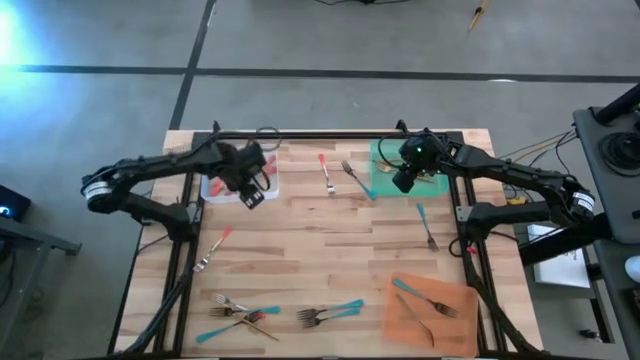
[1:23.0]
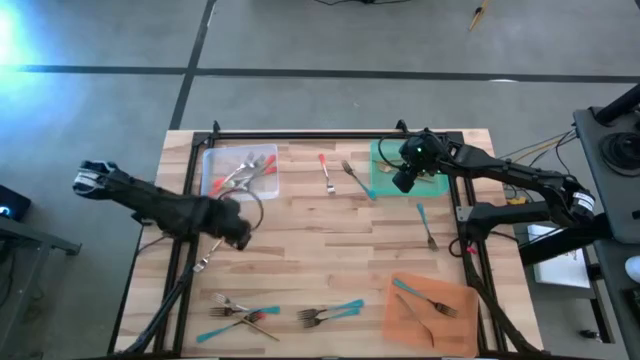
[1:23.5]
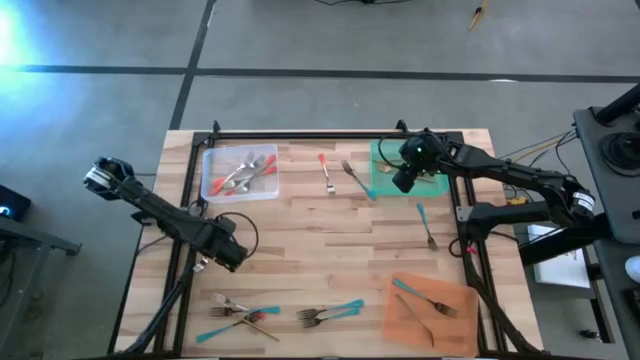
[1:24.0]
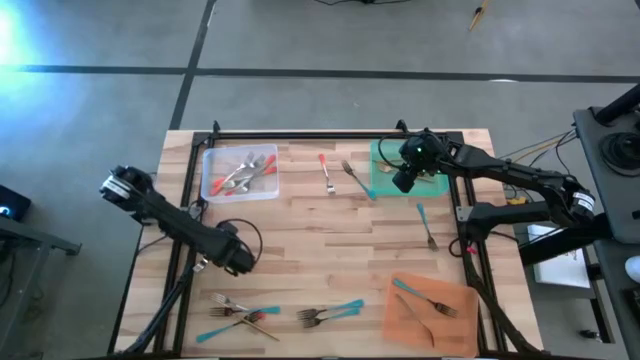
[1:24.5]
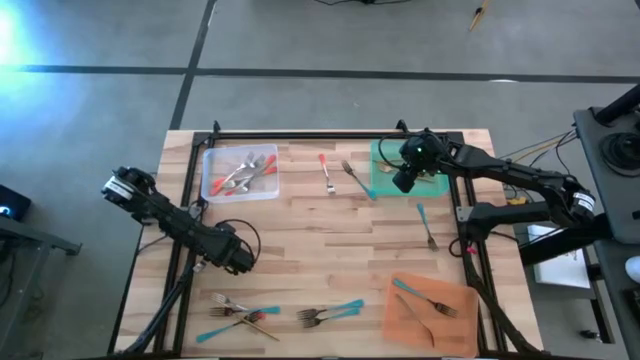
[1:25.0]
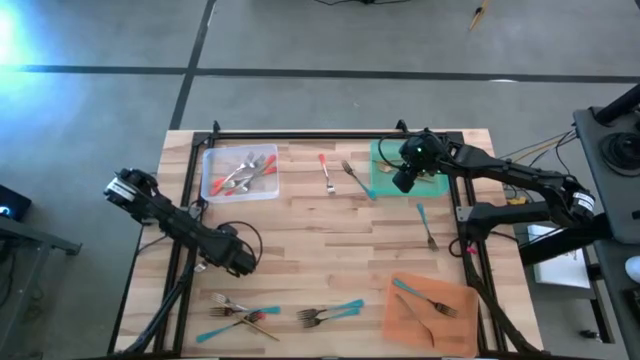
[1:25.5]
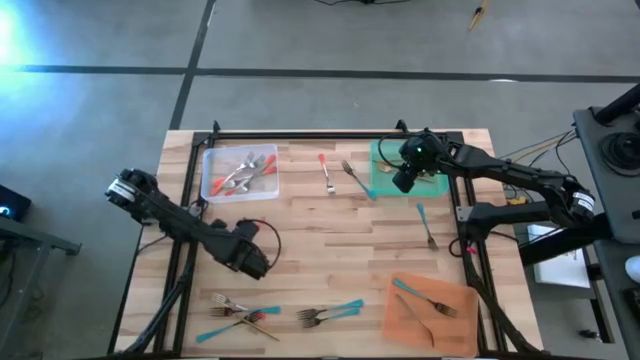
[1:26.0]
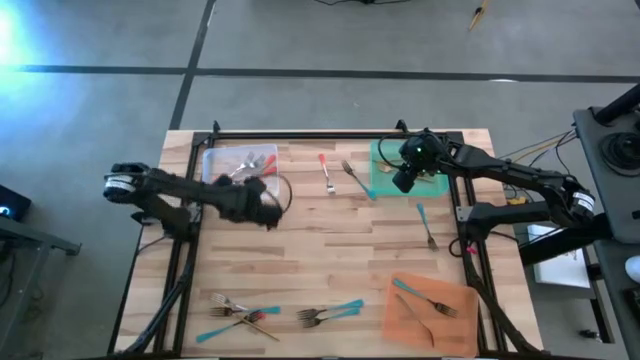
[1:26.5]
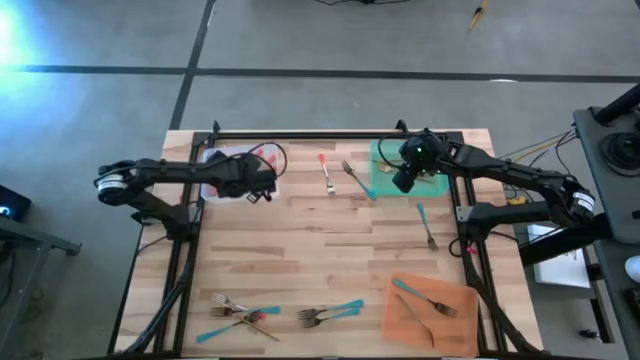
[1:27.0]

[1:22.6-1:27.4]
Task: Sort silverware by color (type)
Put the orange fork into the white bin

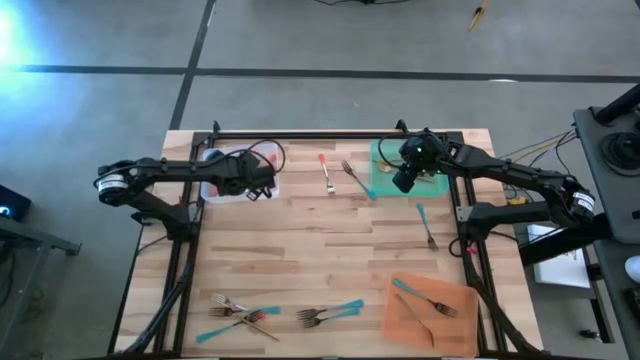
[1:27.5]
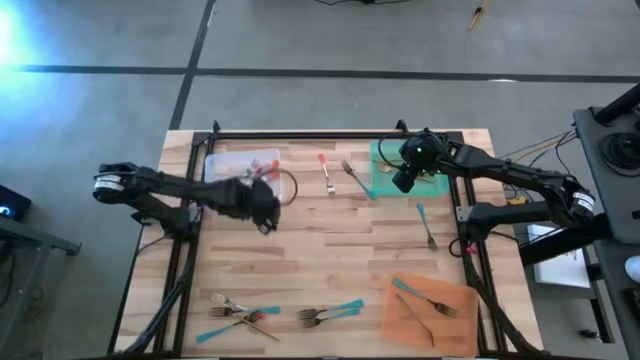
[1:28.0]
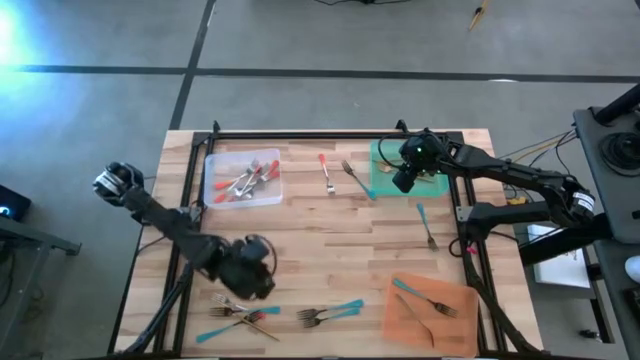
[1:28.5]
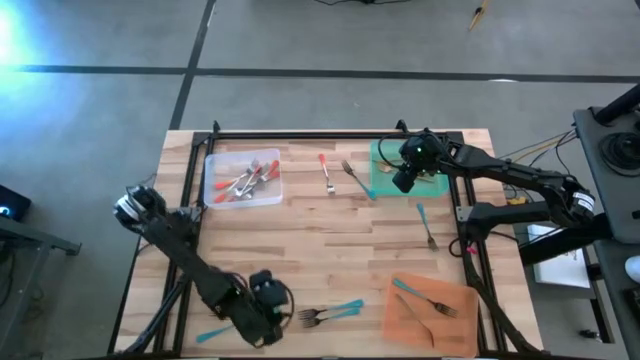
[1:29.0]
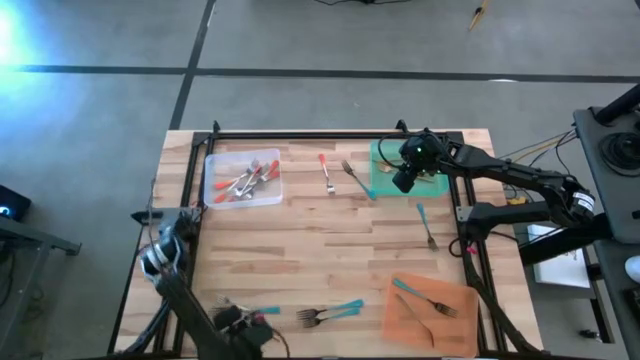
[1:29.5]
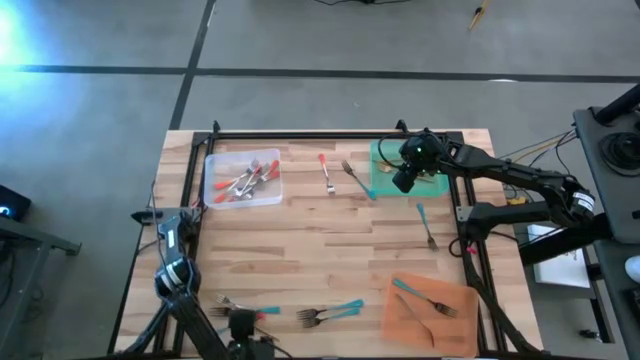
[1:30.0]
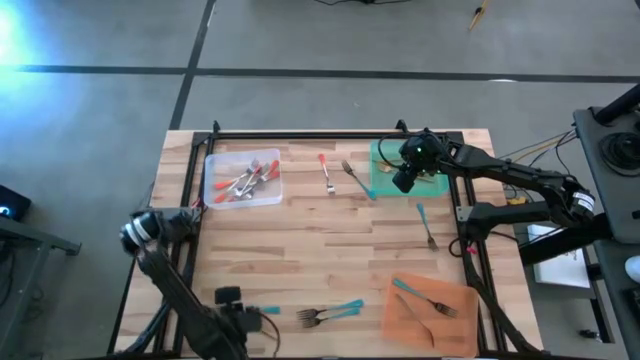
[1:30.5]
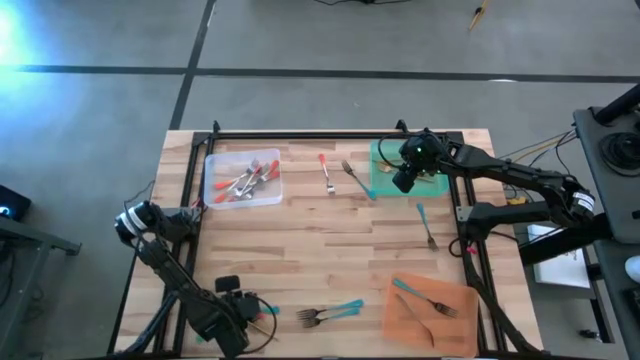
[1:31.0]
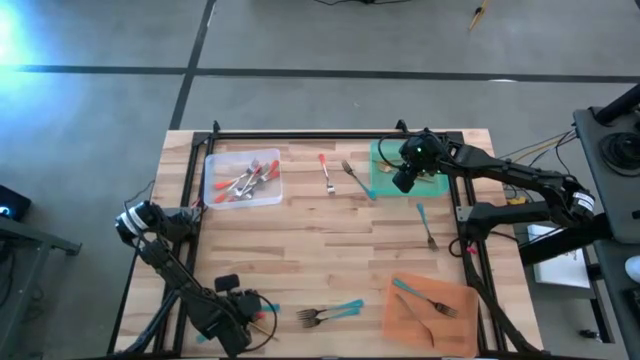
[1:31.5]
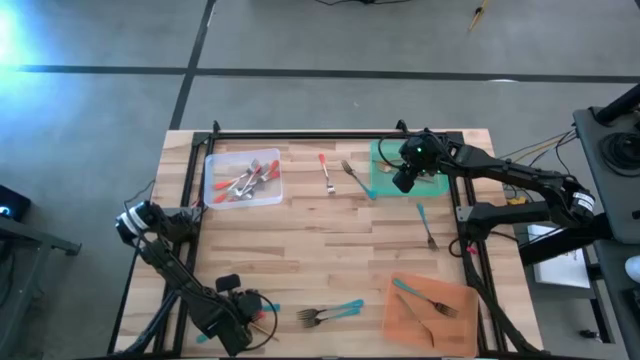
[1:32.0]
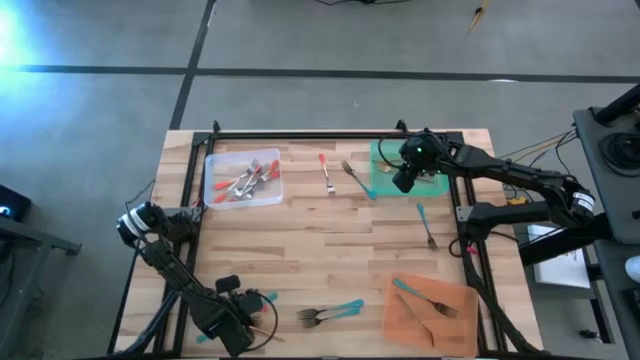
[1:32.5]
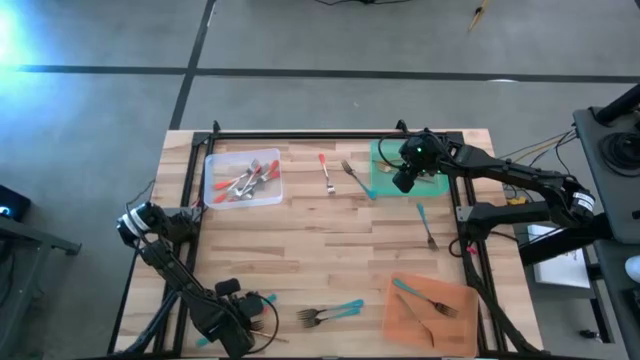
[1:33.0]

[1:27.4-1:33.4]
Put the blue fork into the orange bin

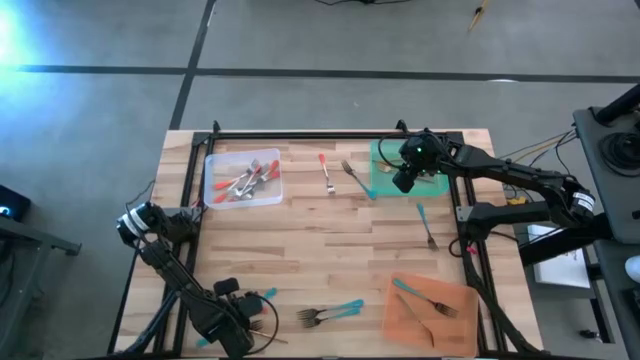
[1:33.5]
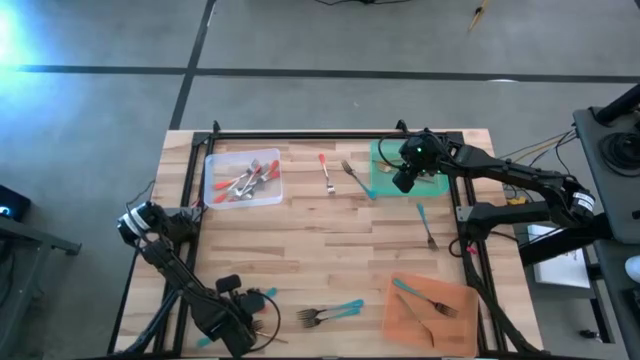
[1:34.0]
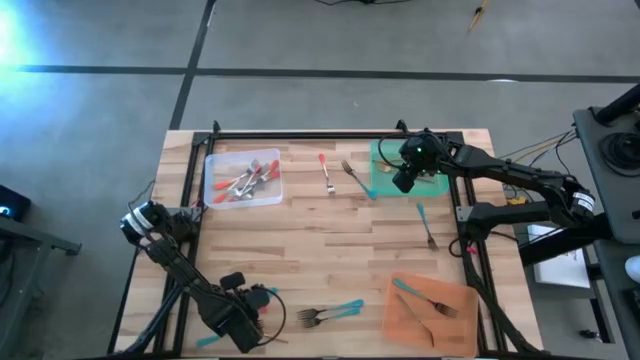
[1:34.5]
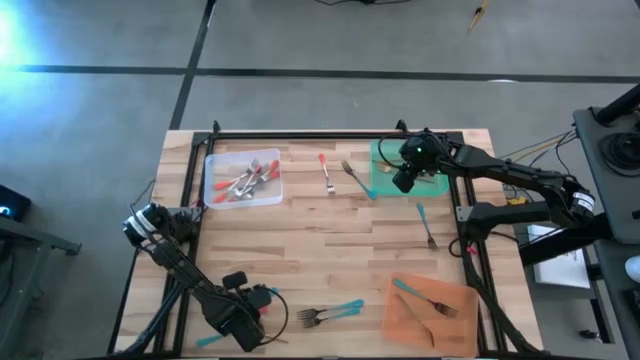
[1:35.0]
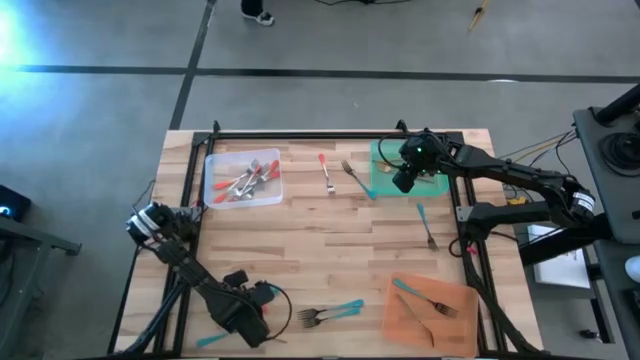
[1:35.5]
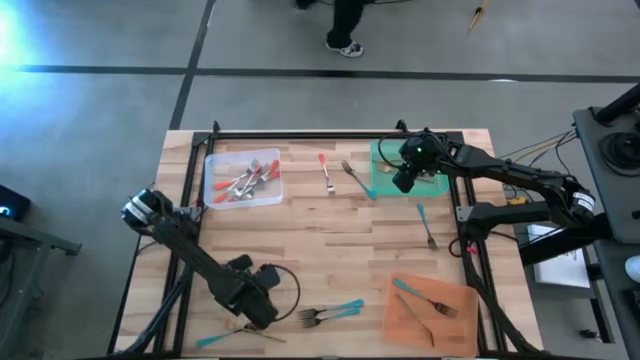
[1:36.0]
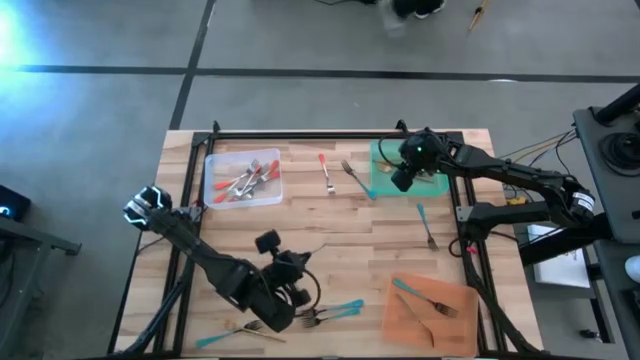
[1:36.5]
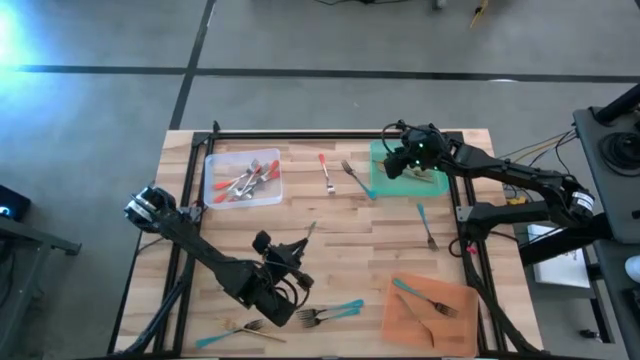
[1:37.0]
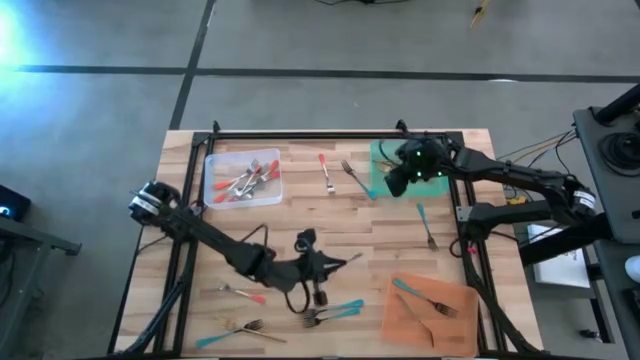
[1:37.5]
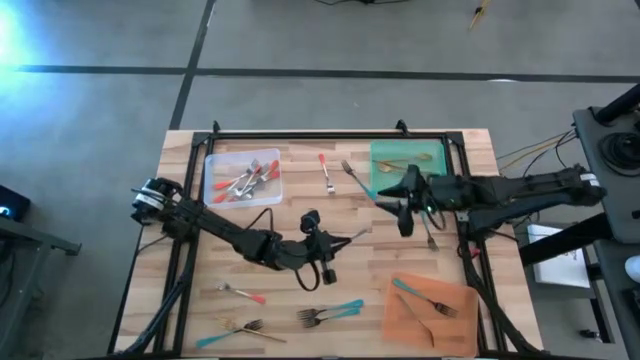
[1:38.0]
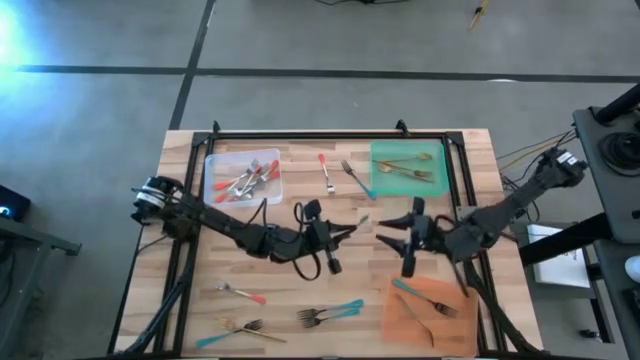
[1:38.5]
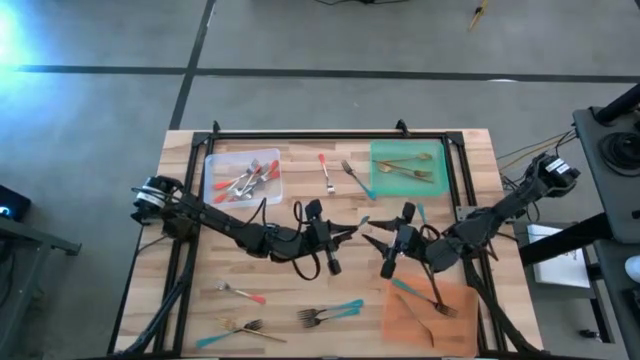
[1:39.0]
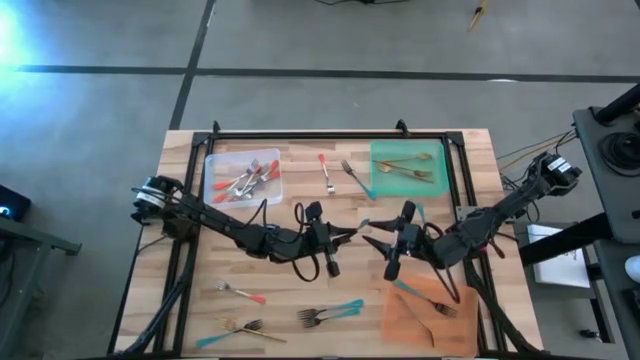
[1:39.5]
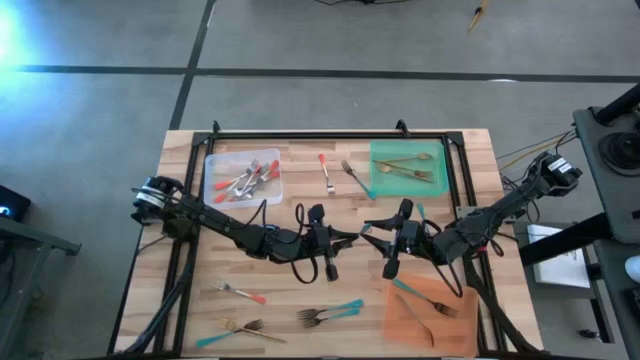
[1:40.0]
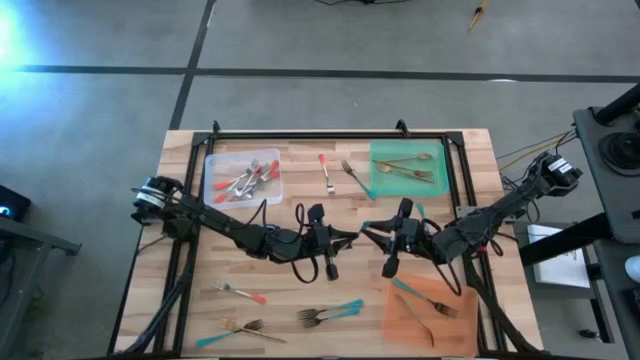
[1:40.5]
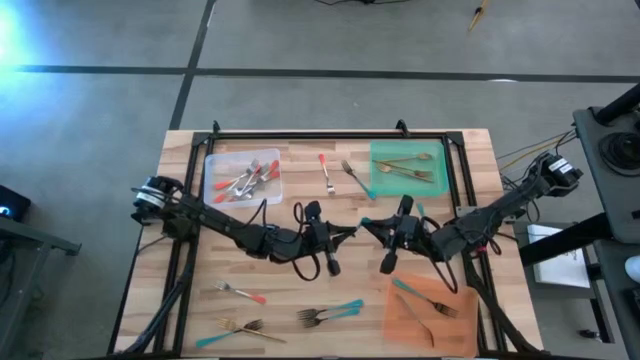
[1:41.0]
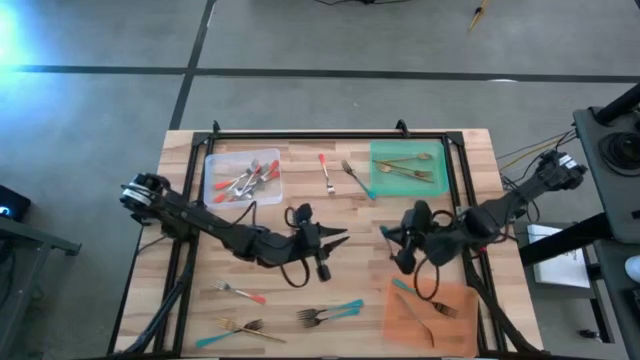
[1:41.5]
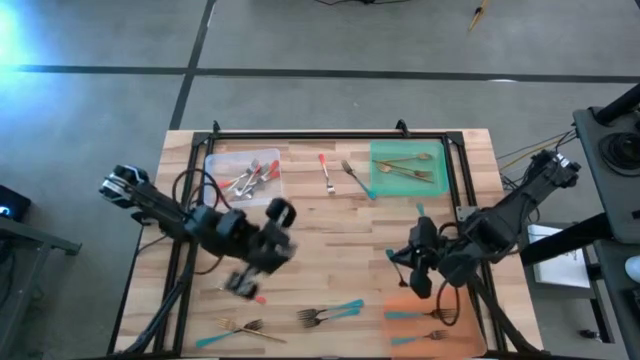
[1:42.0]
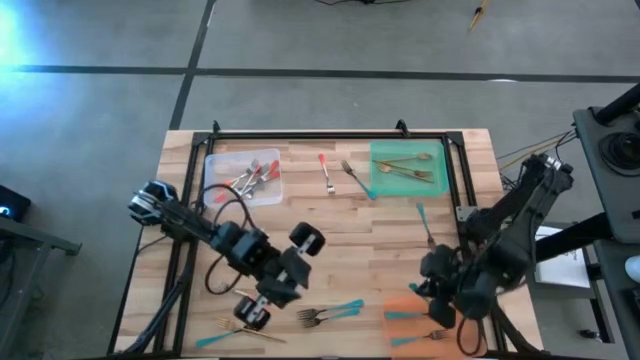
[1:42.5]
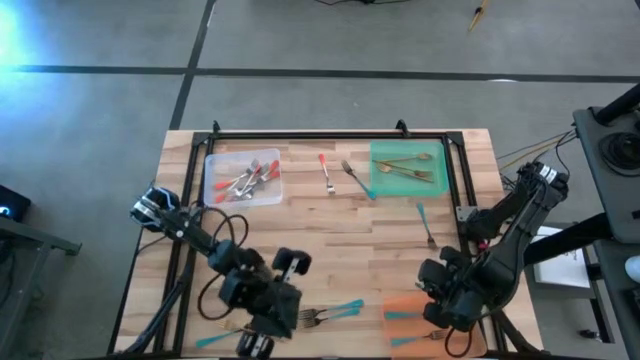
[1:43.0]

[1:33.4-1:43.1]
Put the blue fork into the orange bin

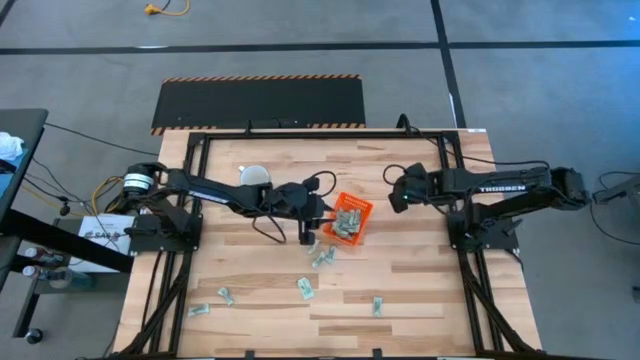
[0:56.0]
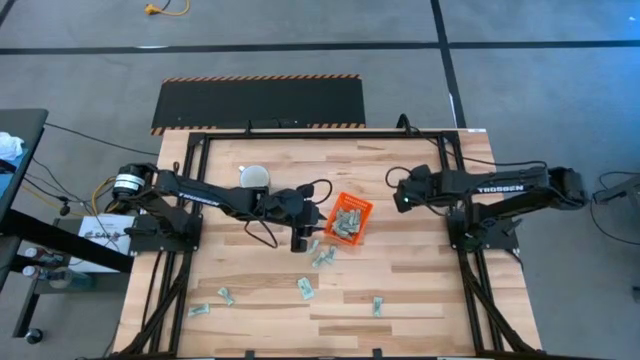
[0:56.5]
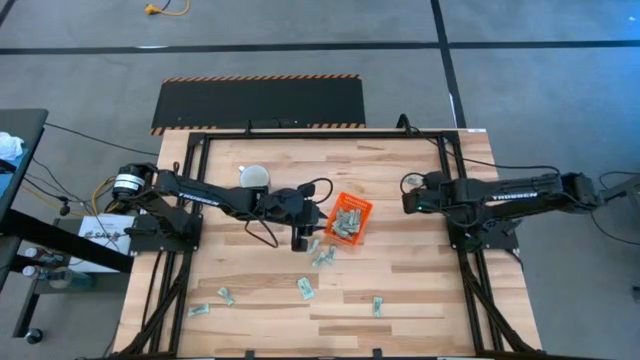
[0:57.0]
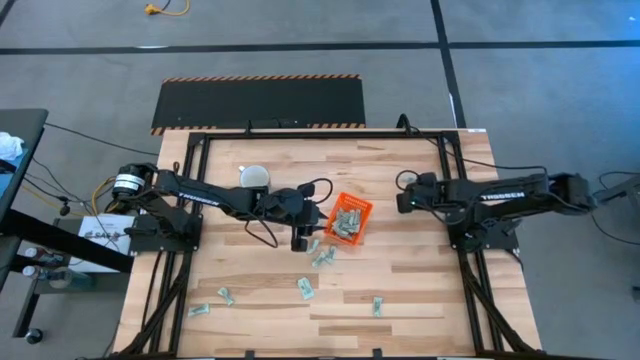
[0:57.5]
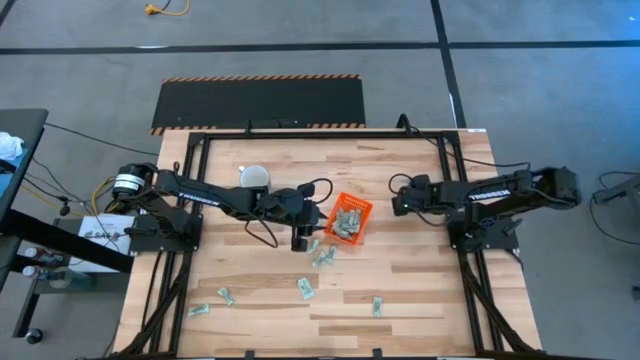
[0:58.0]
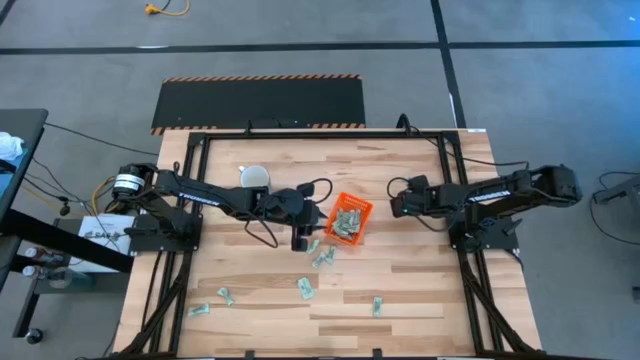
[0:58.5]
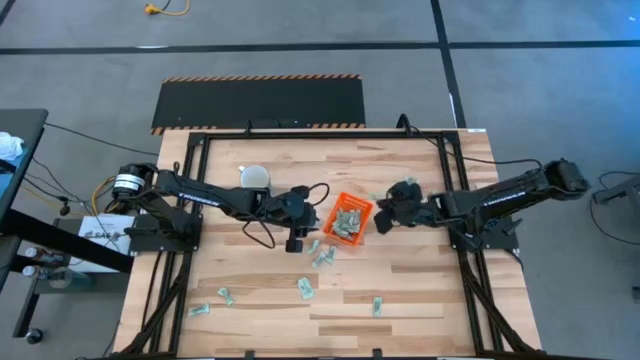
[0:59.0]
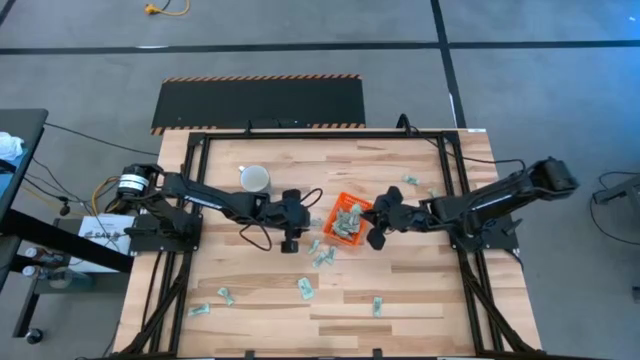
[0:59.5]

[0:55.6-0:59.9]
Task: Pick and place Stevia / Truvia into bins
Put the stevia packet into the basket
